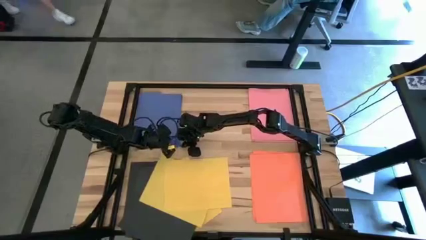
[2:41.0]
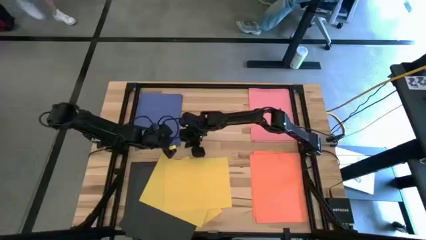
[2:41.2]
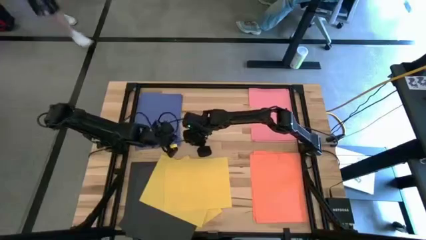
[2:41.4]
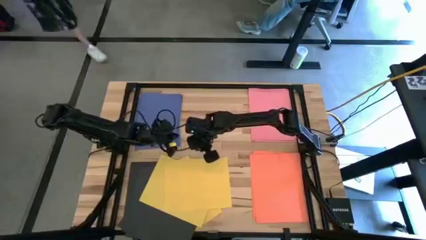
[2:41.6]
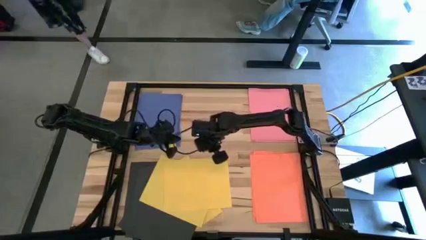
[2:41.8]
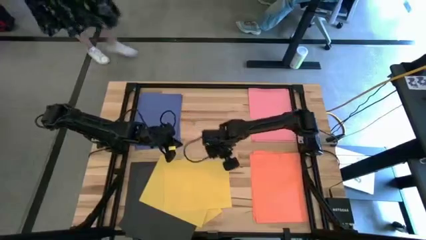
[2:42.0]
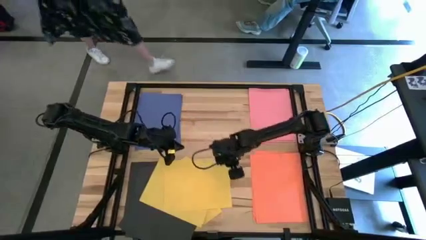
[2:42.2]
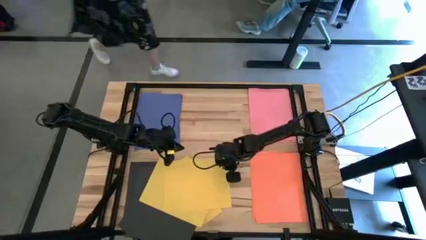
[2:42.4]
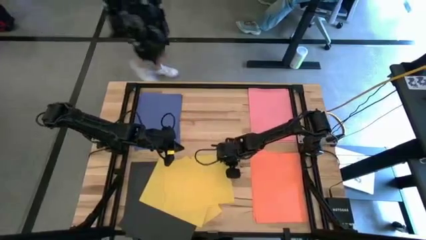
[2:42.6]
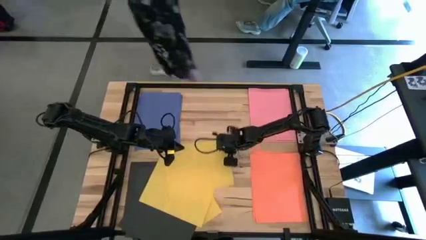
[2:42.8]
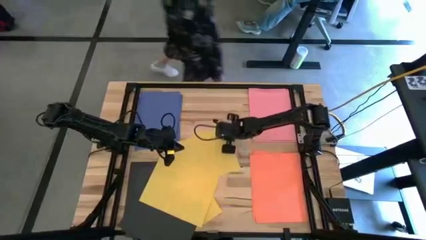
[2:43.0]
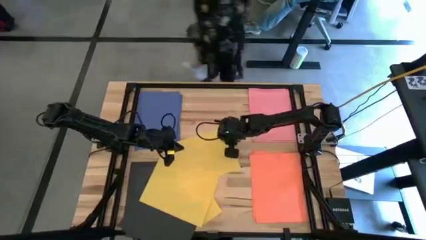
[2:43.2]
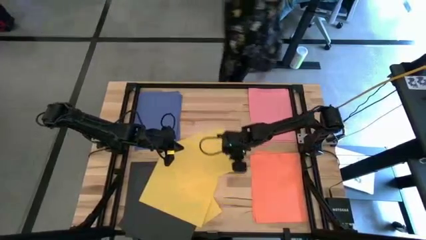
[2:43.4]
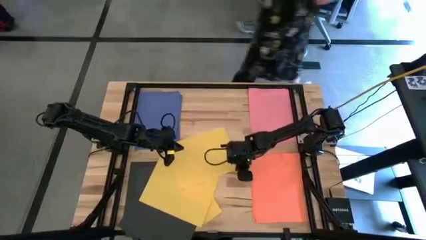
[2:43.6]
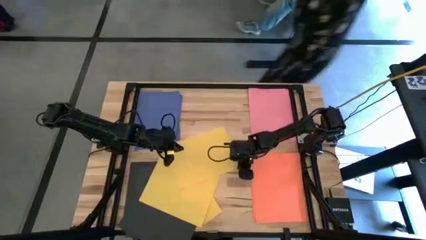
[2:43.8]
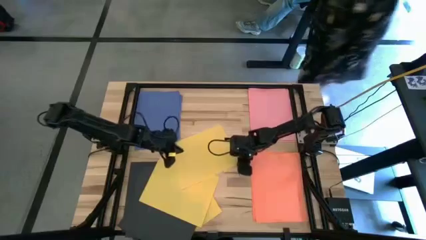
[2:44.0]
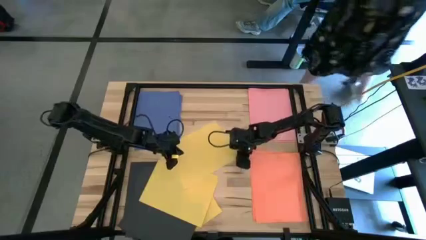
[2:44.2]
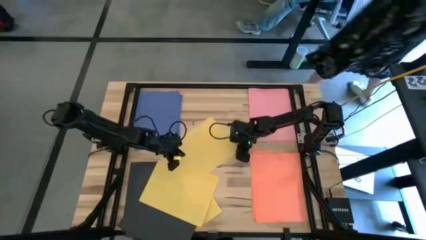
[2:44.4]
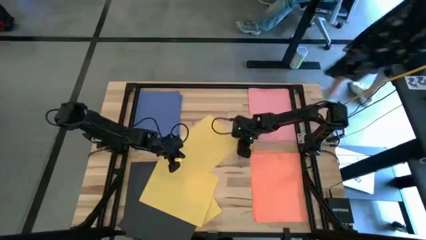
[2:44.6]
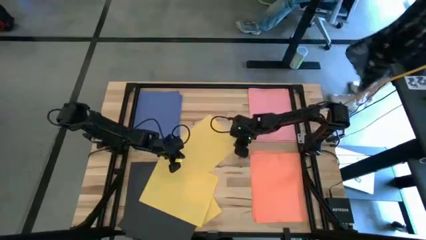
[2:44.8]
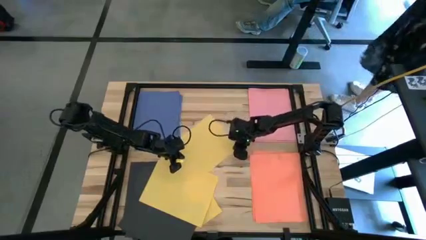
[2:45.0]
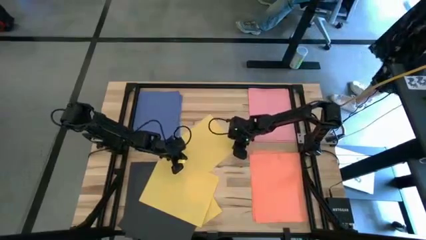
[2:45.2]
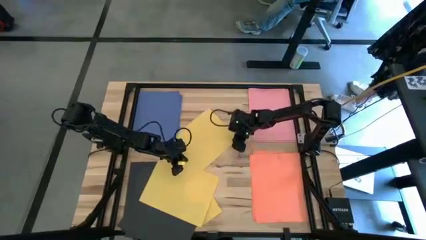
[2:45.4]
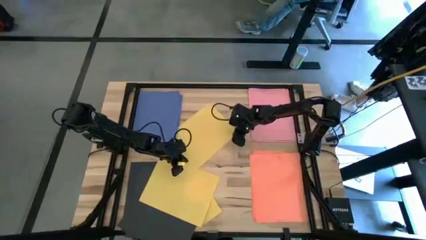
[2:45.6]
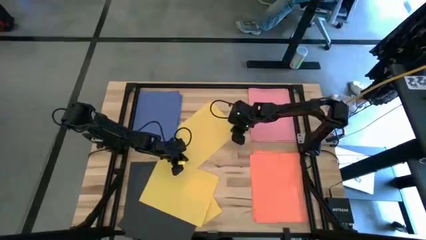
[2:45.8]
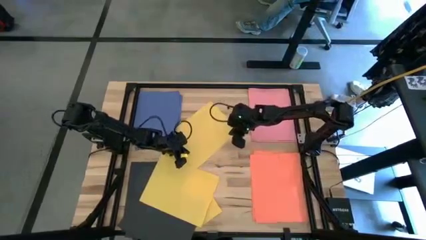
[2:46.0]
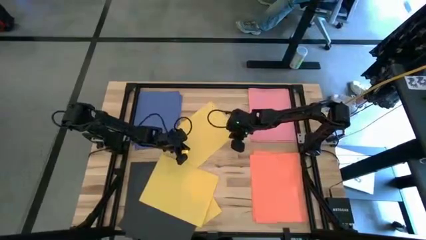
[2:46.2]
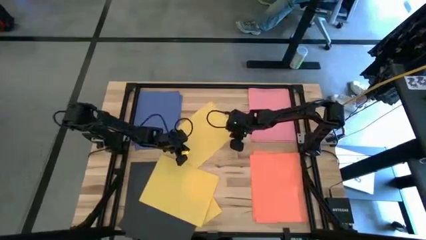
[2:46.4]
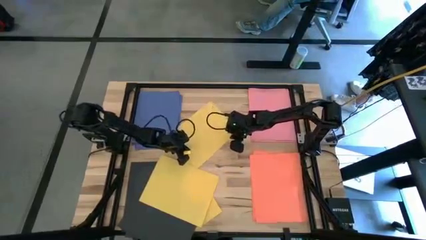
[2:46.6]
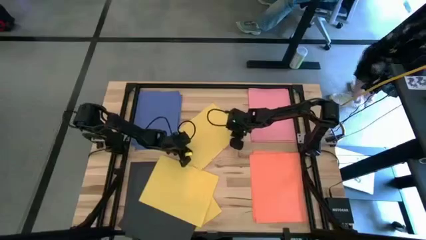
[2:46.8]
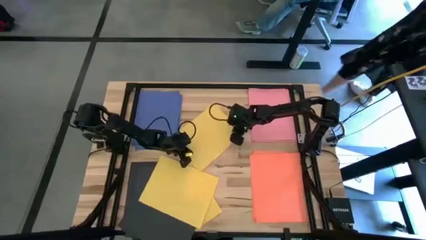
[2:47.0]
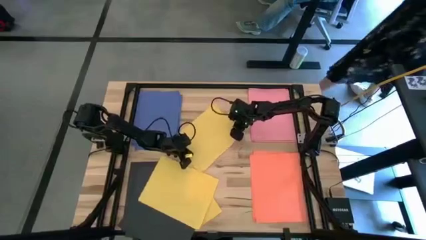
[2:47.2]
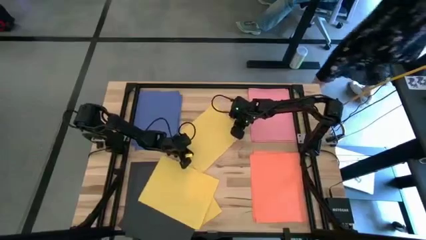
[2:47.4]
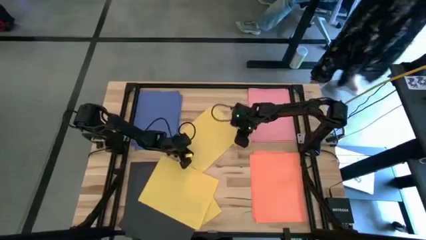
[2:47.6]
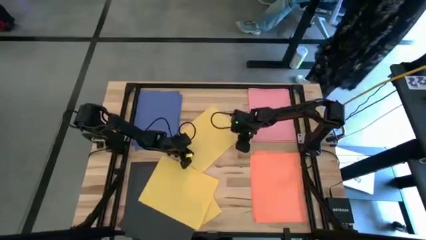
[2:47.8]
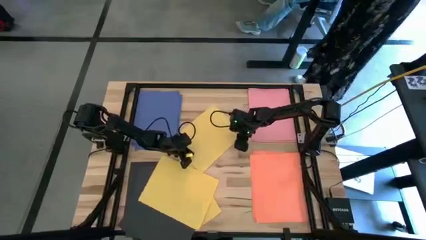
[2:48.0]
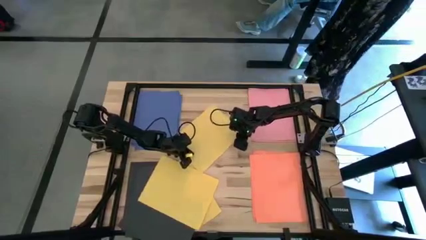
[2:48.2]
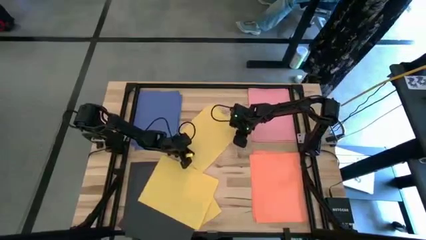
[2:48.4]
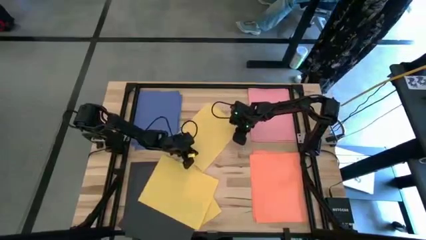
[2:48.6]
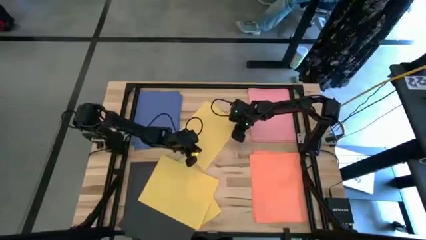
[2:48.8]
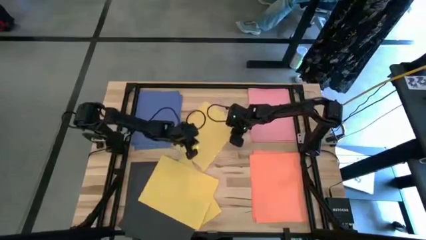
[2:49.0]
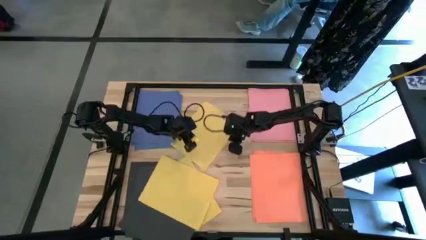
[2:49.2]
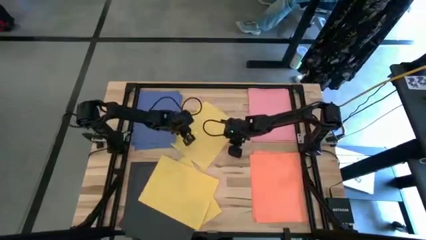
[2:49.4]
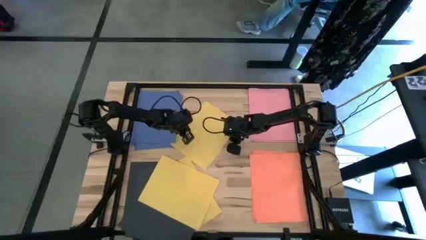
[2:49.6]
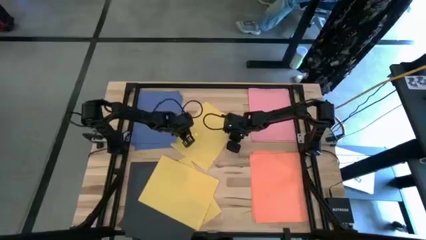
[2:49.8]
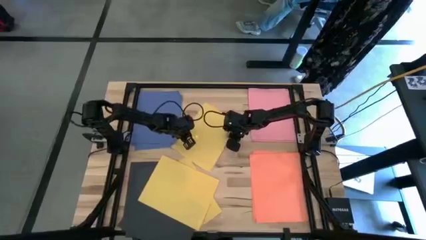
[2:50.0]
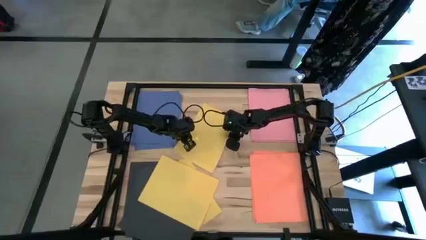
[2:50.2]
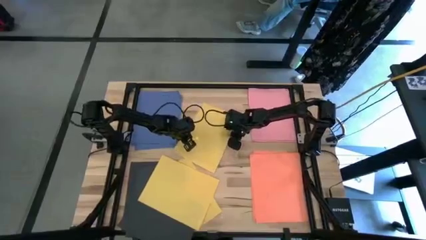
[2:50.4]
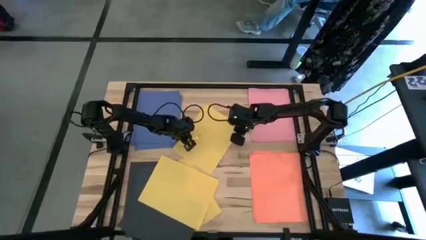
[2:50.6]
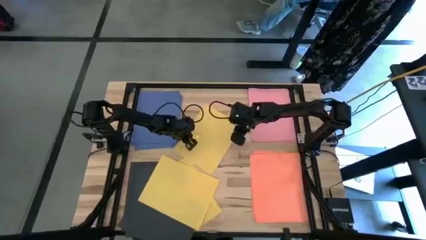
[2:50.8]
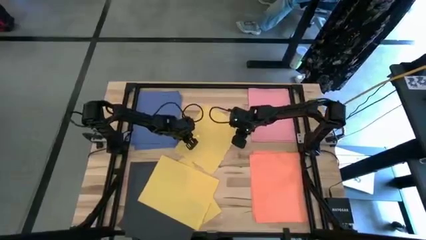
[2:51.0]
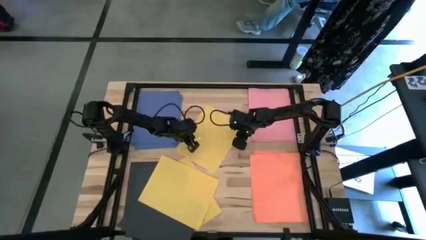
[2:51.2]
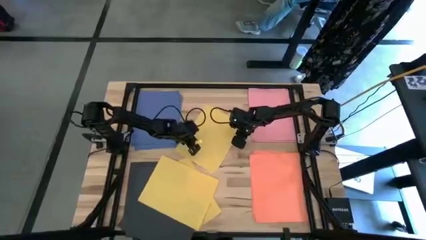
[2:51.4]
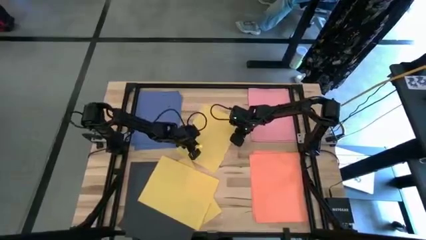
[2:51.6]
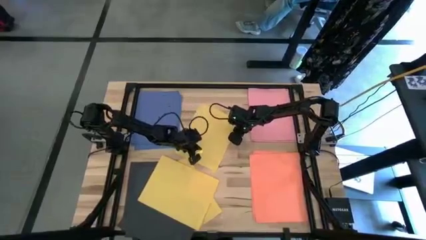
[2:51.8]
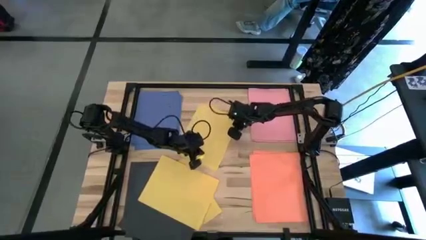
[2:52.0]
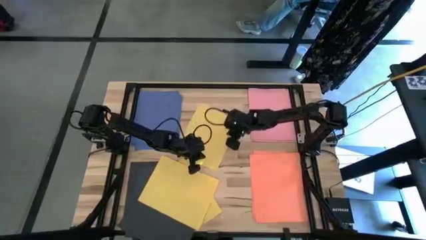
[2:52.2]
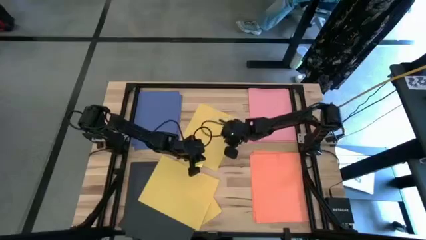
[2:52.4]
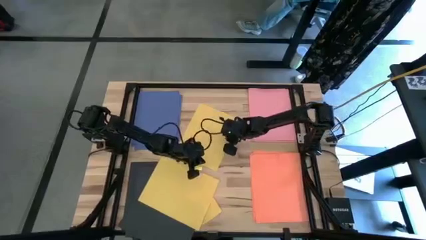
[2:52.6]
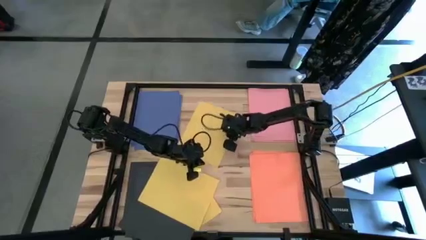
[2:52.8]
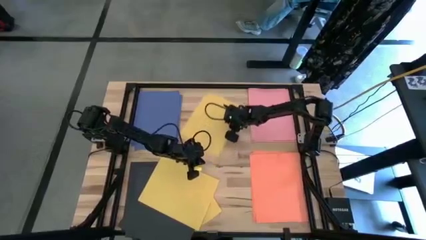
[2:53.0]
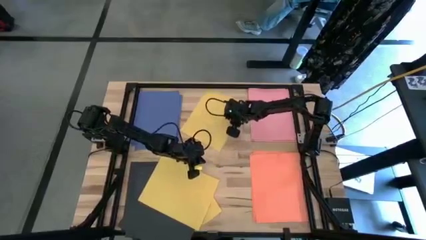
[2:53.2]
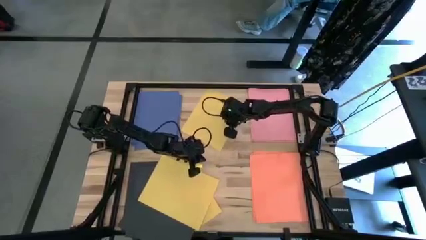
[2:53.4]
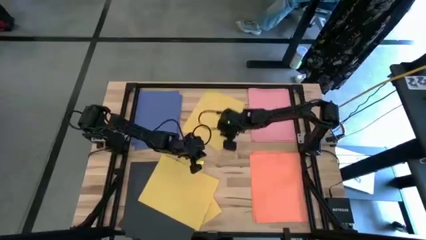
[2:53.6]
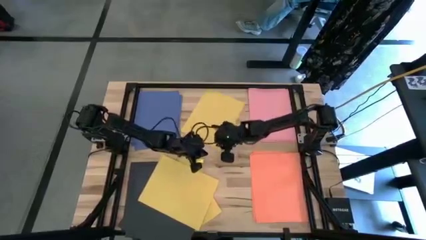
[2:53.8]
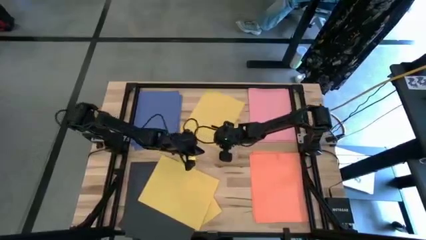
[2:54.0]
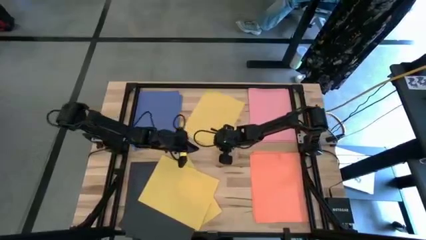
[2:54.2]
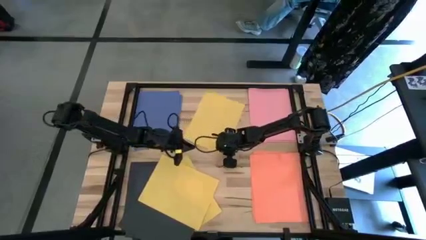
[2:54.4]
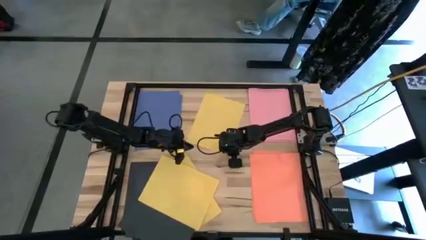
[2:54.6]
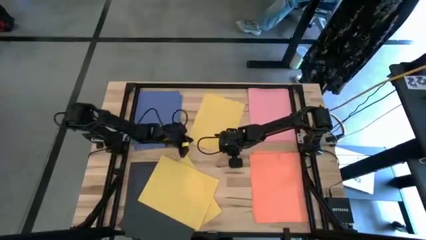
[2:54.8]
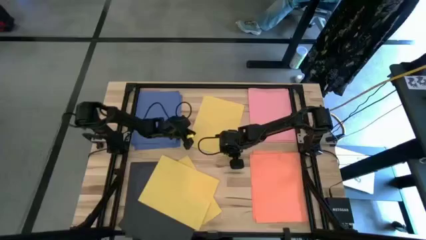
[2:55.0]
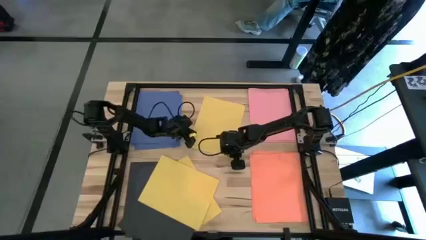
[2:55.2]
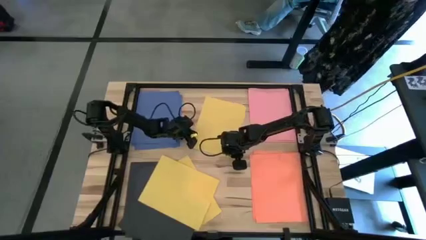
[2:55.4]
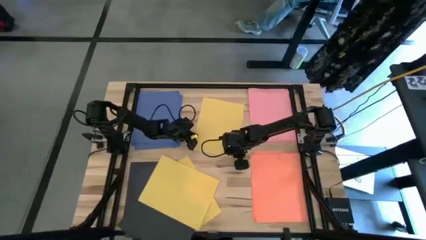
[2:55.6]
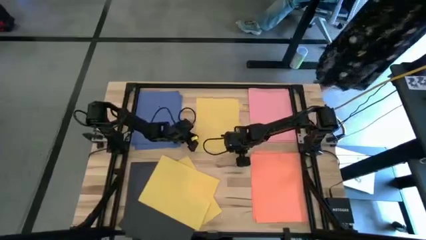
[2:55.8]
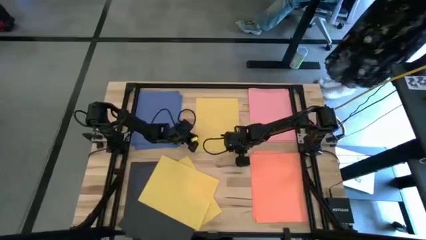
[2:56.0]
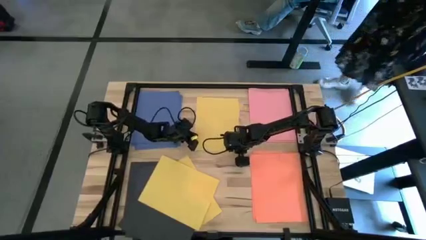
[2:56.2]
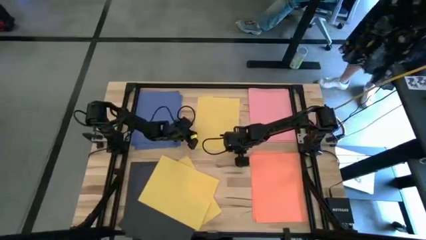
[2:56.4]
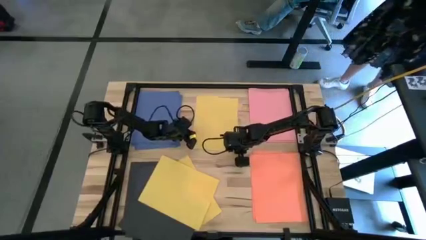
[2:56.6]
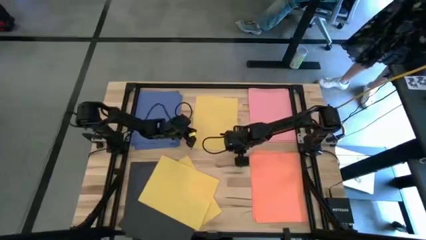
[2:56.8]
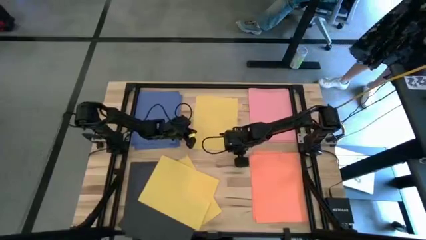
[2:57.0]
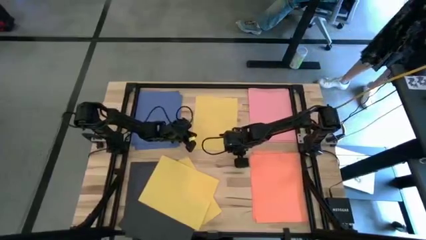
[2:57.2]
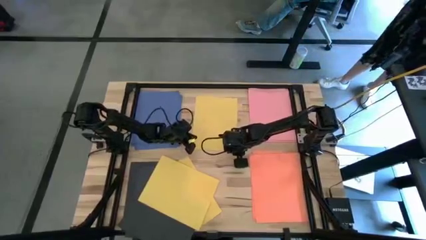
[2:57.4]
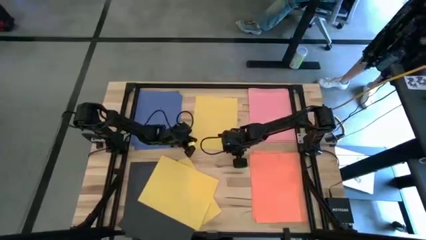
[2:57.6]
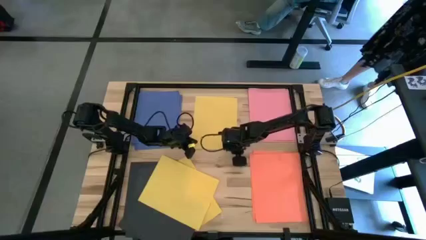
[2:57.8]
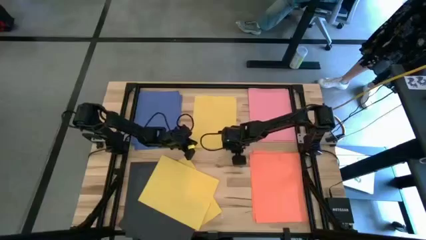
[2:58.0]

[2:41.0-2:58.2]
Task: Organize paper
Move the yellow paper to the top center of the table
